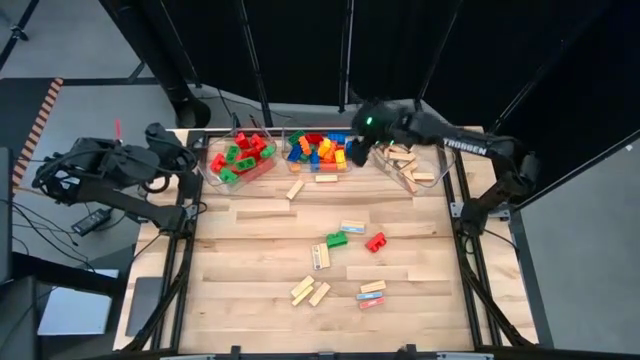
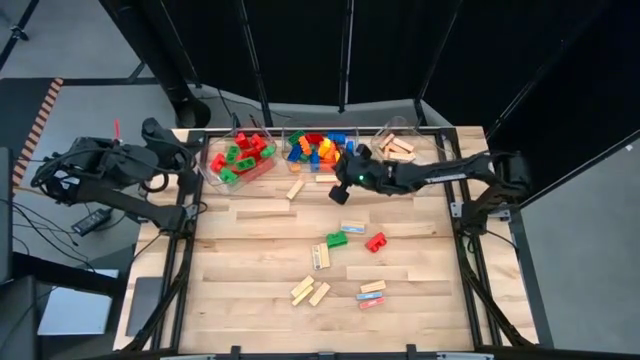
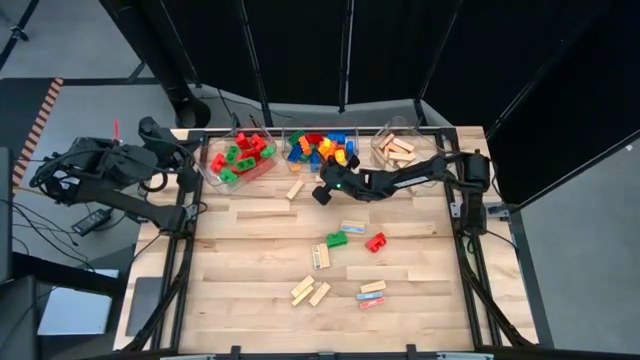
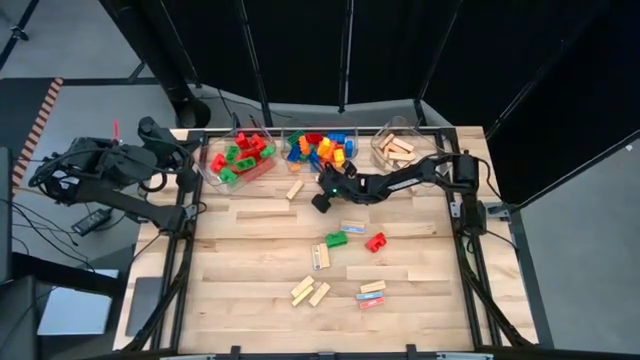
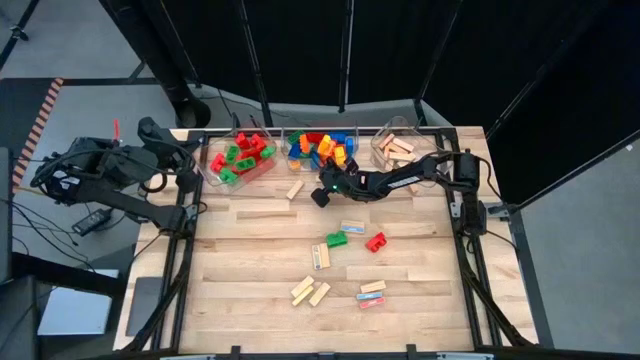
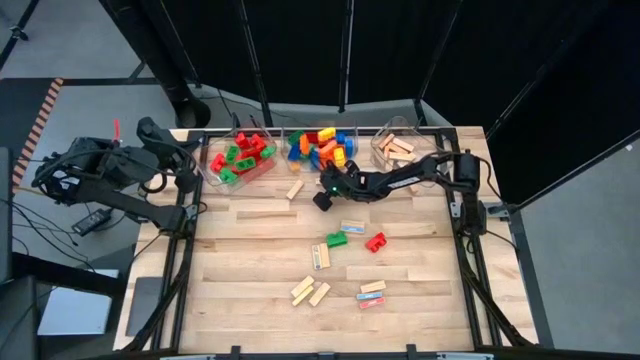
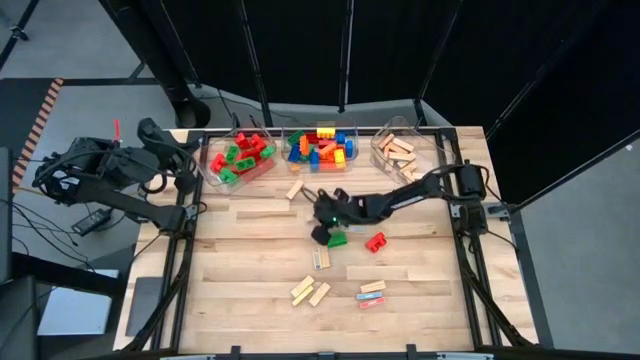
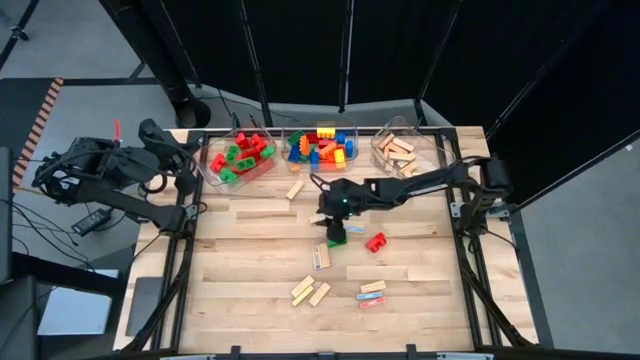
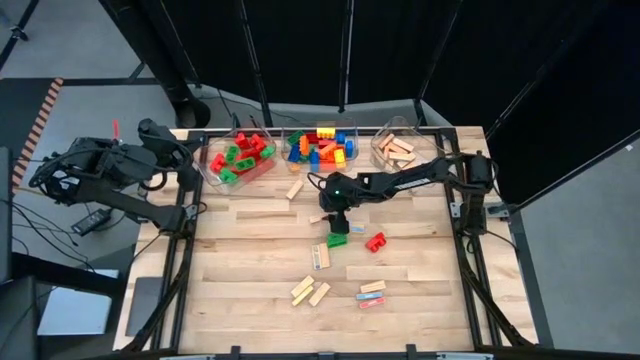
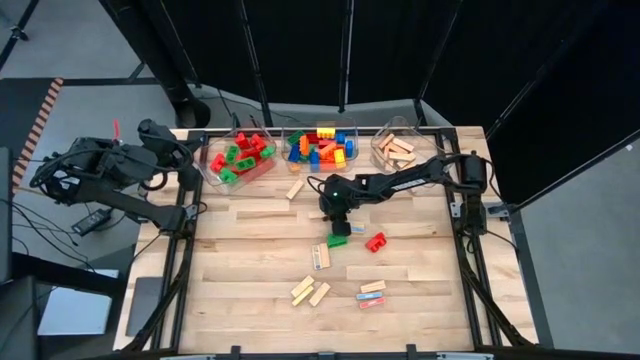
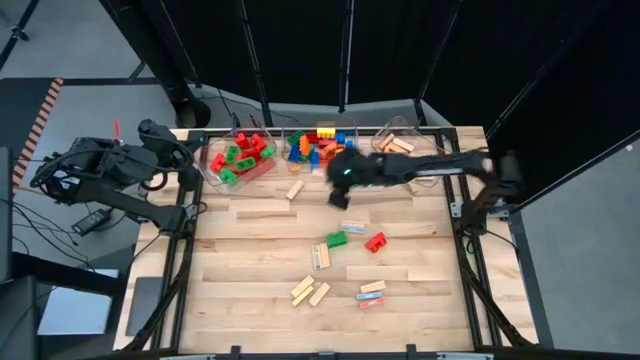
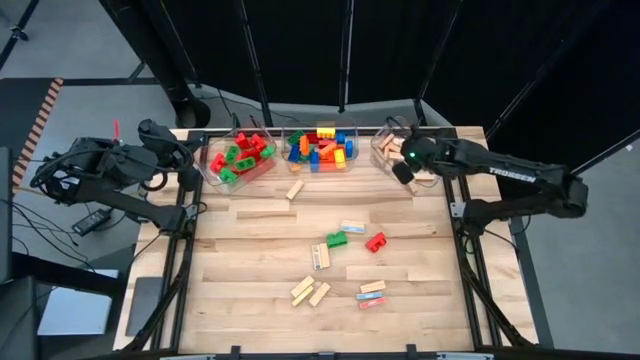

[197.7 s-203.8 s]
Task: Sort blocks by size
Put the brown wooden block into the right transparent bin

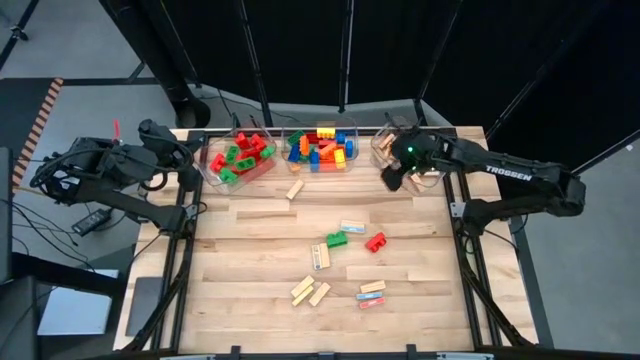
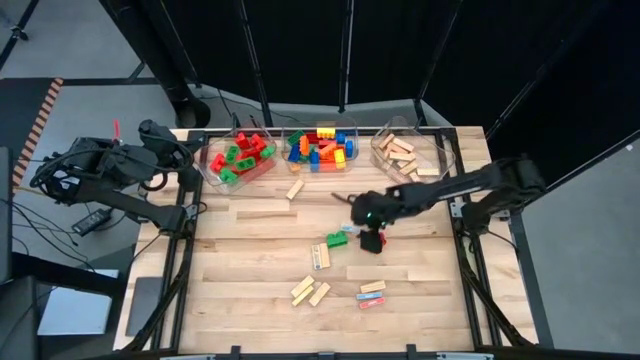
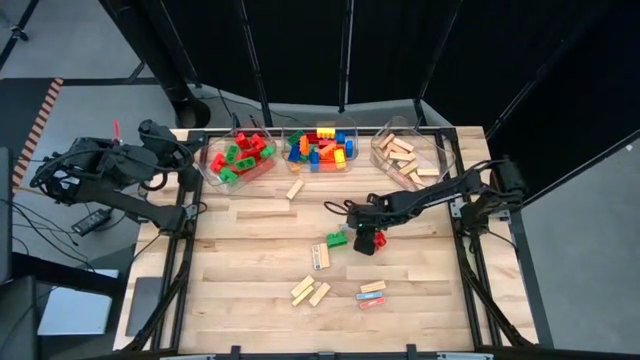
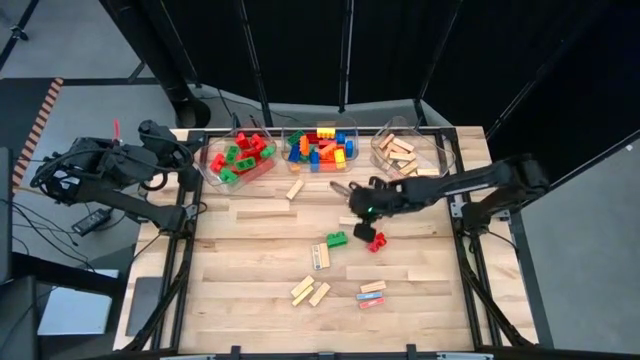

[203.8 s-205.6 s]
Put the brown wooden block into the right transparent bin

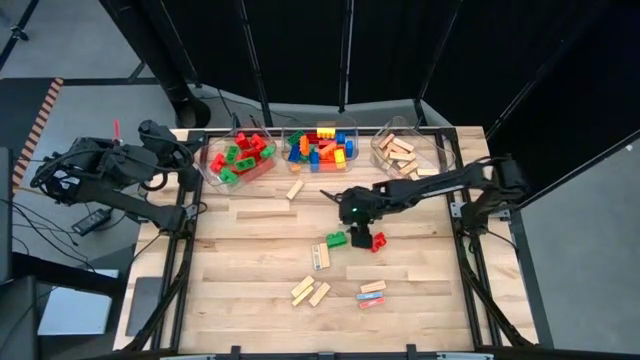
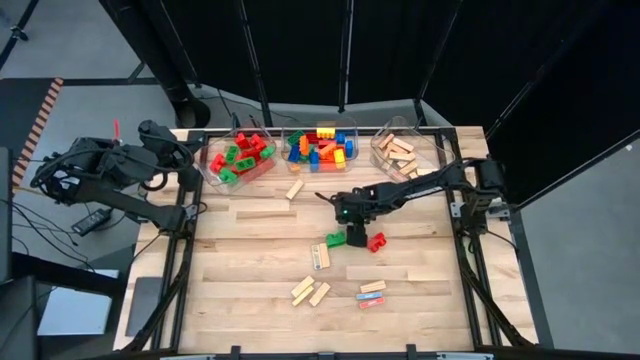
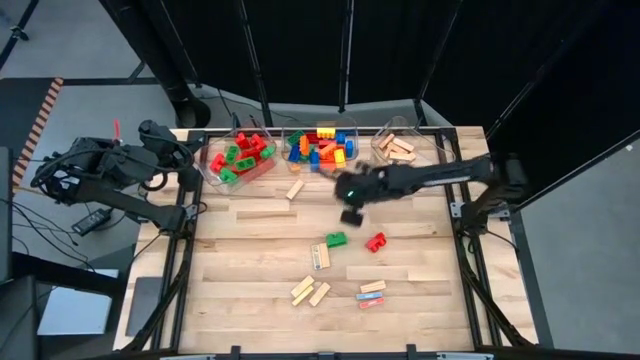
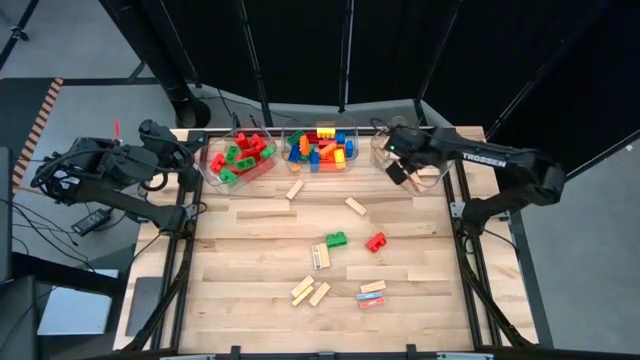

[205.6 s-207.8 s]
Put the brown wooden block into the right transparent bin

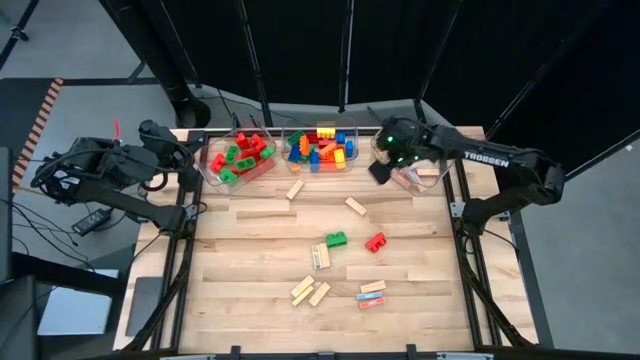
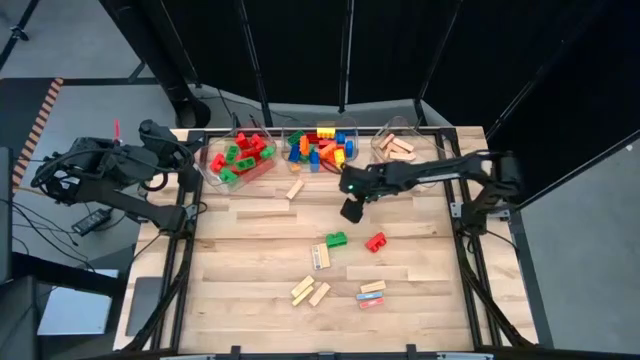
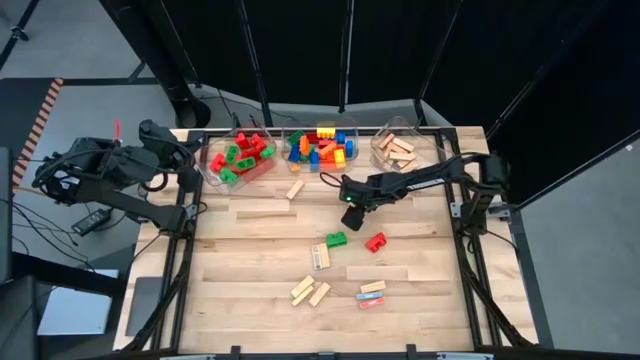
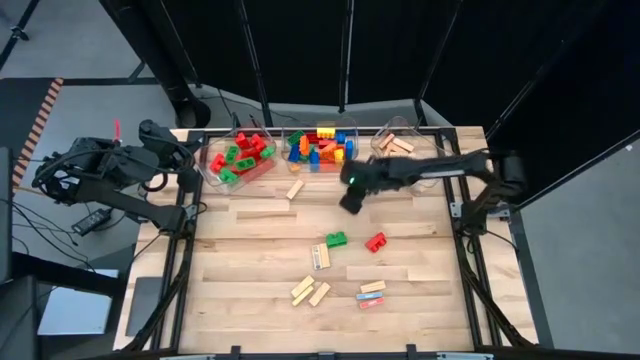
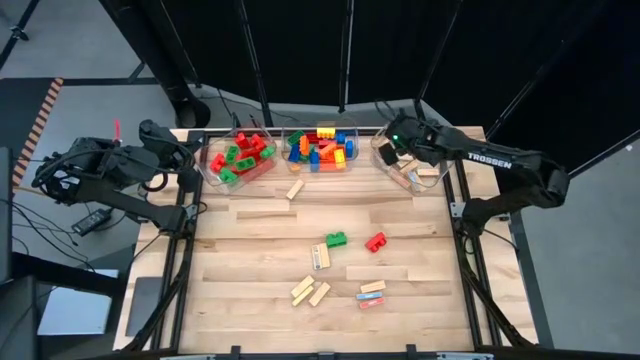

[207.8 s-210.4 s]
Put the brown wooden block into the right transparent bin

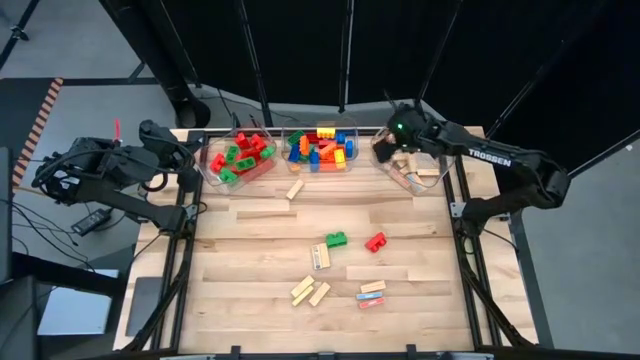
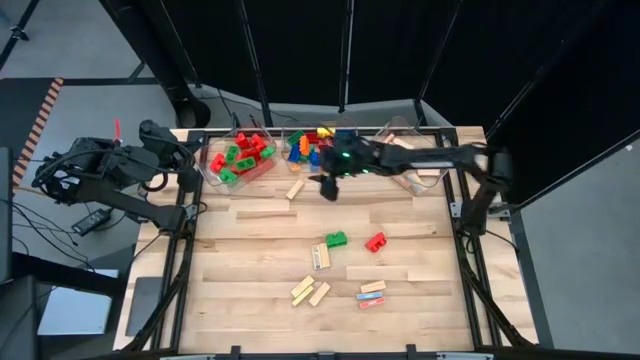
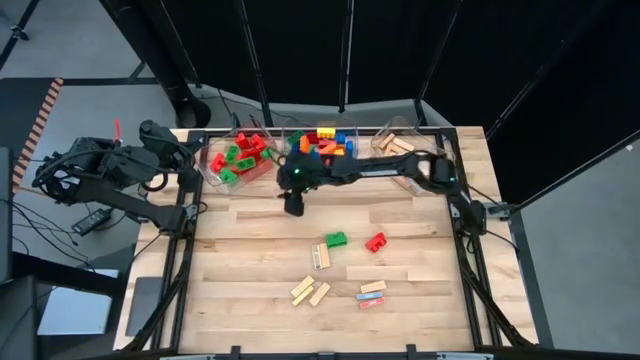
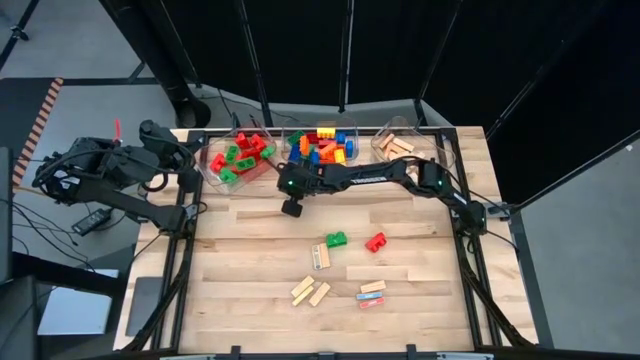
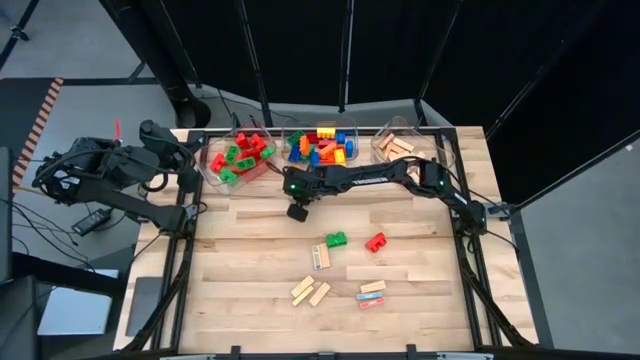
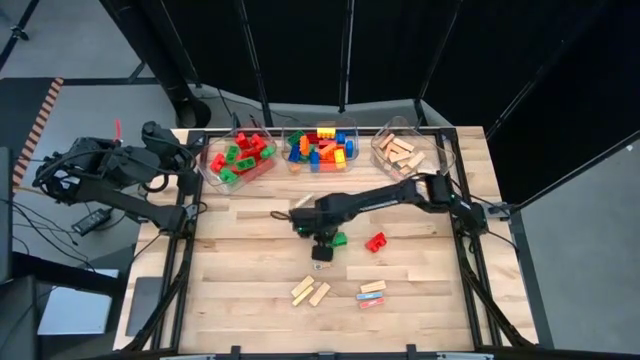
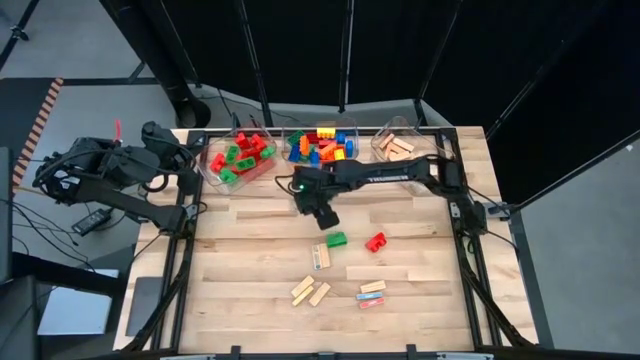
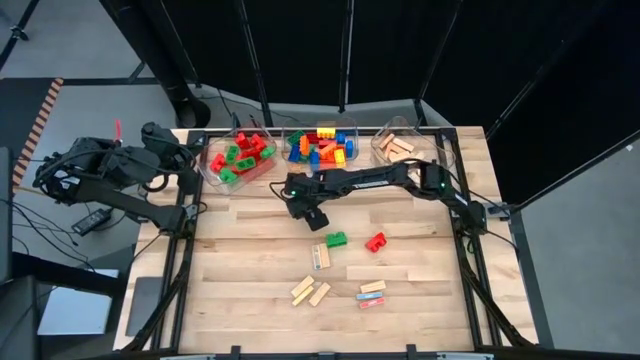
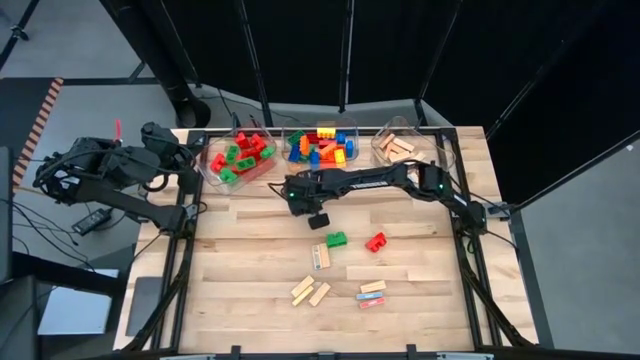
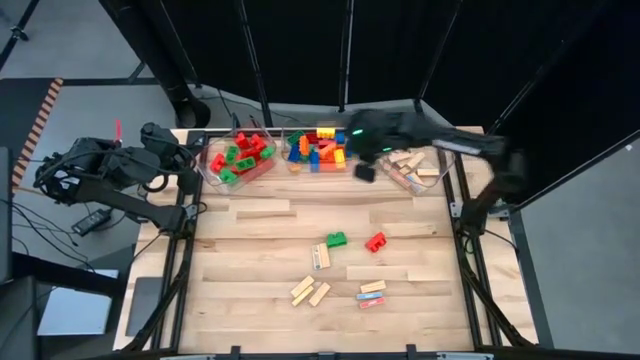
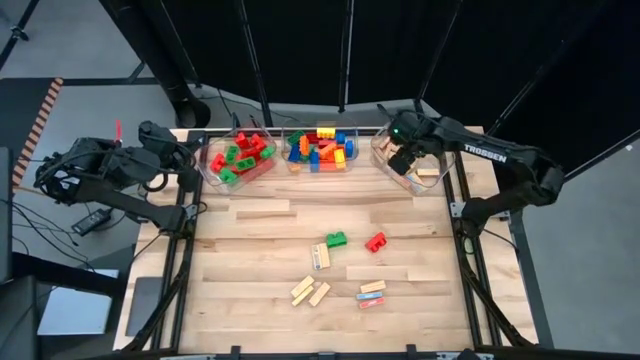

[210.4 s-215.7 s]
Put the brown wooden block into the right transparent bin

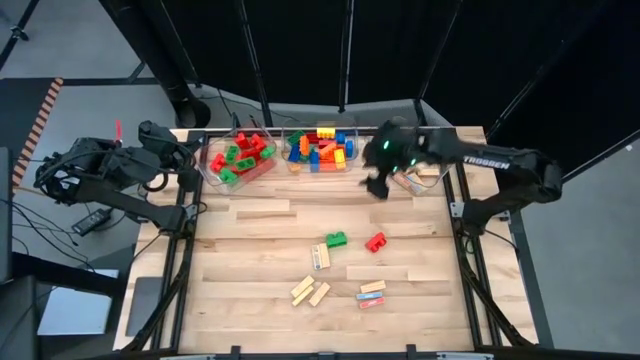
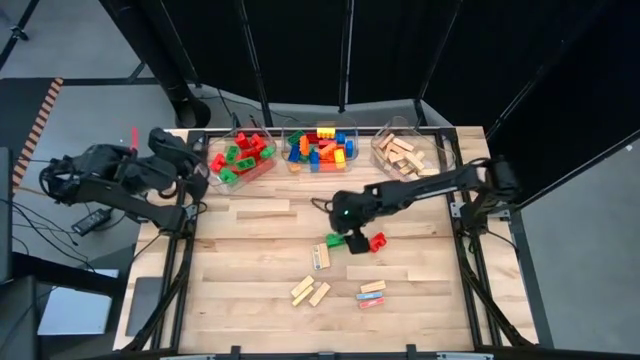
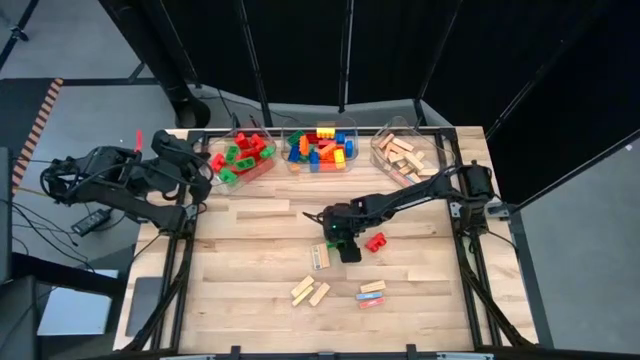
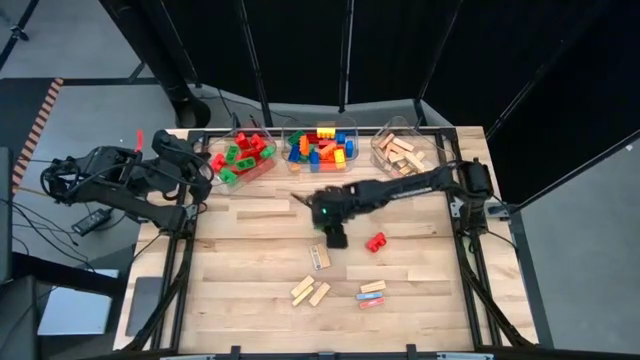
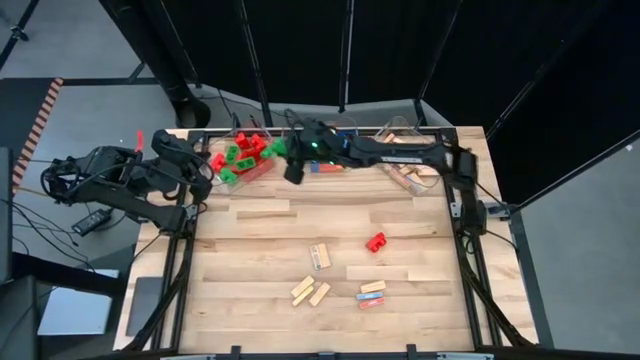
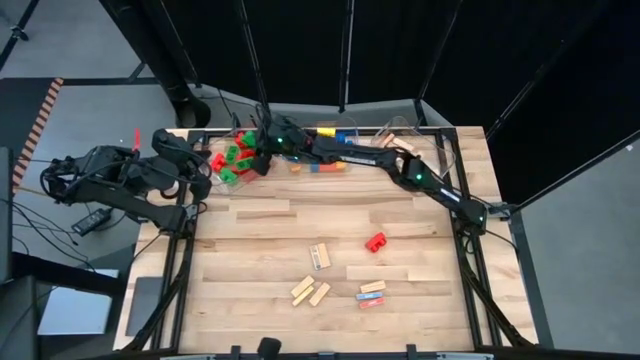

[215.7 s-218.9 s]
Put the small green game piece into the left transparent bin
